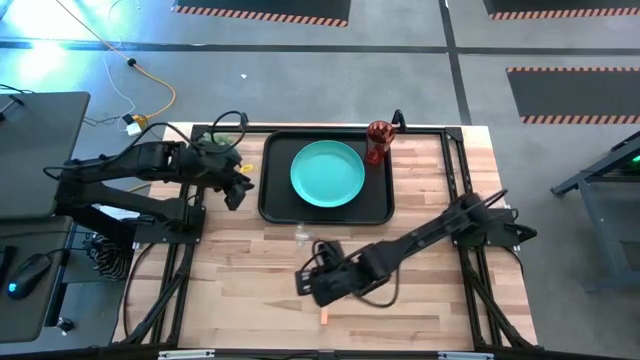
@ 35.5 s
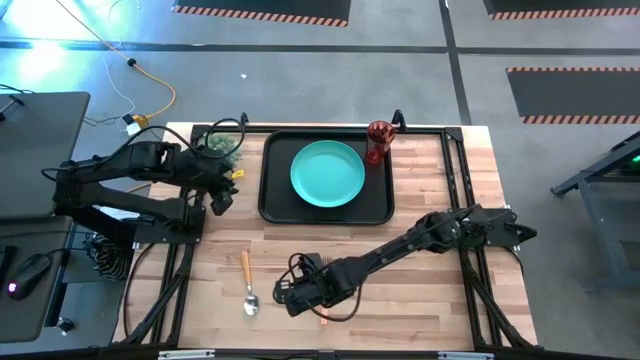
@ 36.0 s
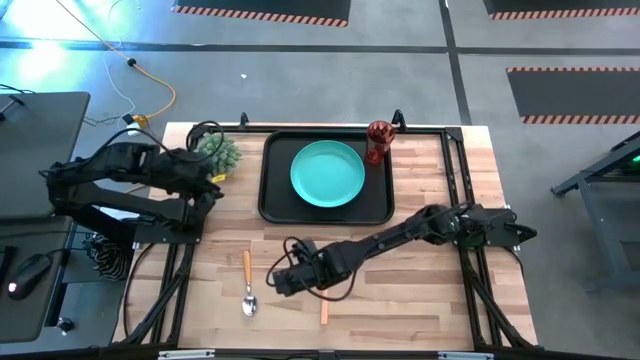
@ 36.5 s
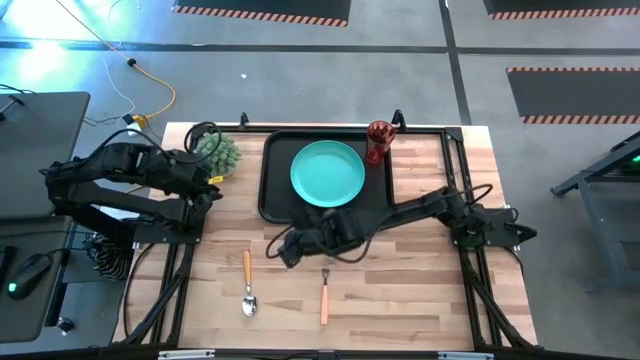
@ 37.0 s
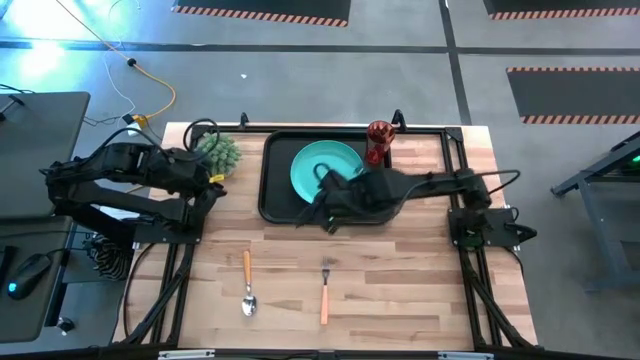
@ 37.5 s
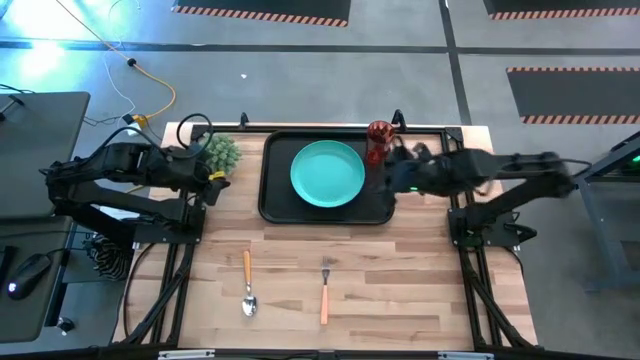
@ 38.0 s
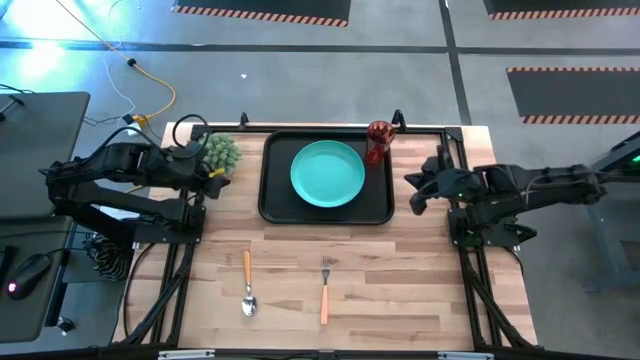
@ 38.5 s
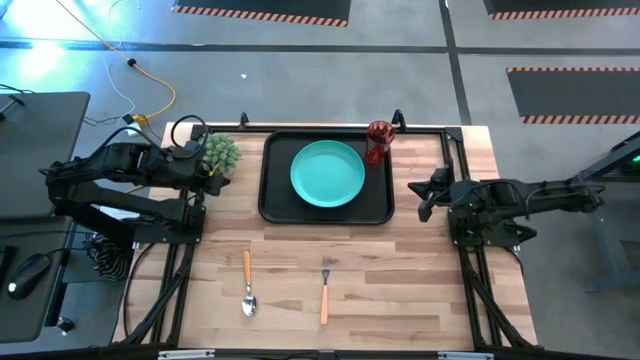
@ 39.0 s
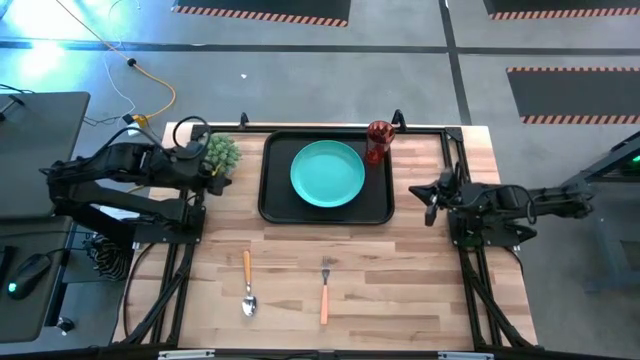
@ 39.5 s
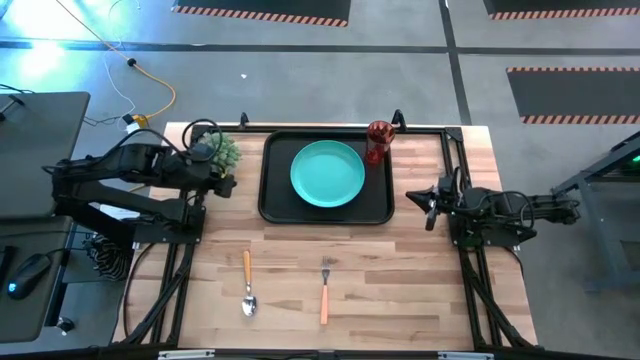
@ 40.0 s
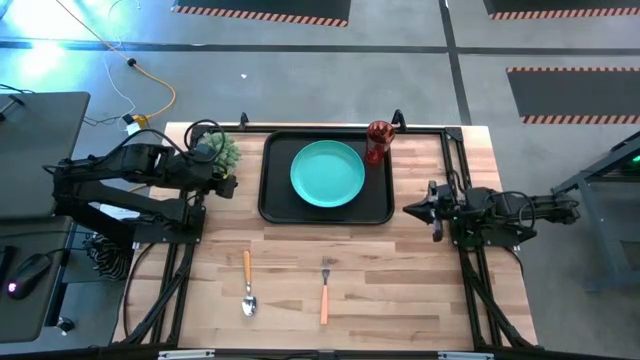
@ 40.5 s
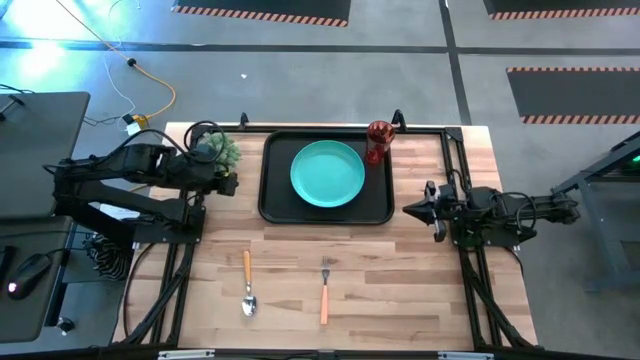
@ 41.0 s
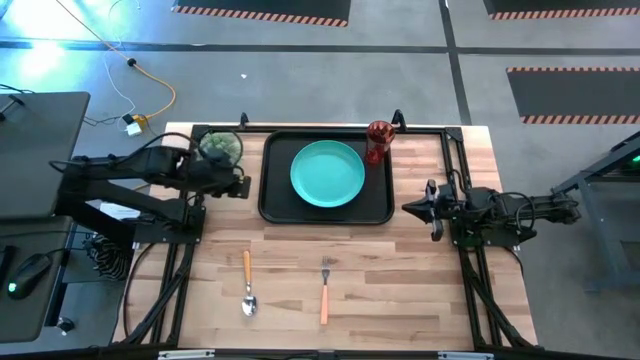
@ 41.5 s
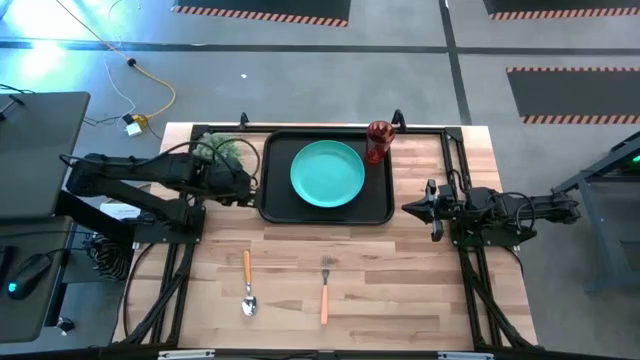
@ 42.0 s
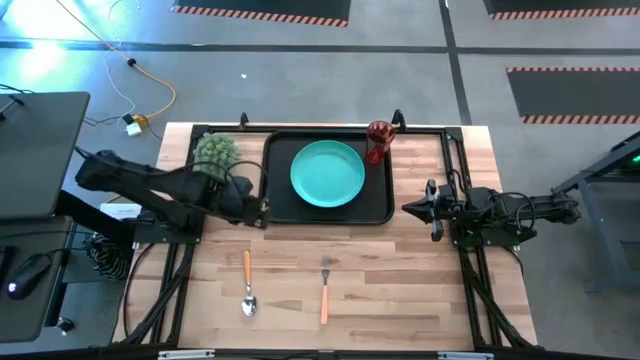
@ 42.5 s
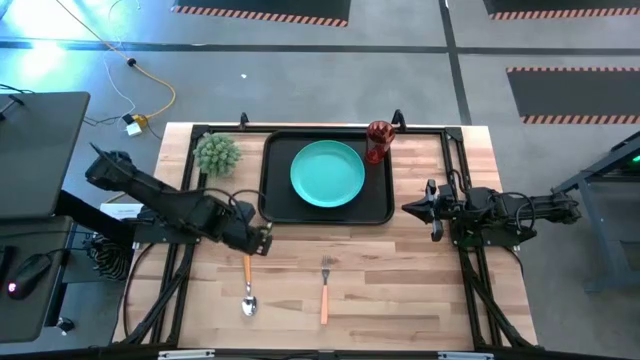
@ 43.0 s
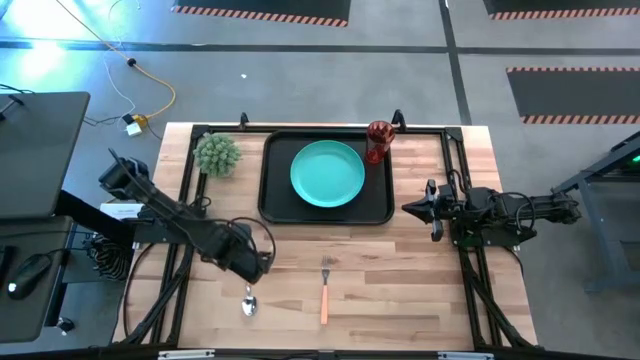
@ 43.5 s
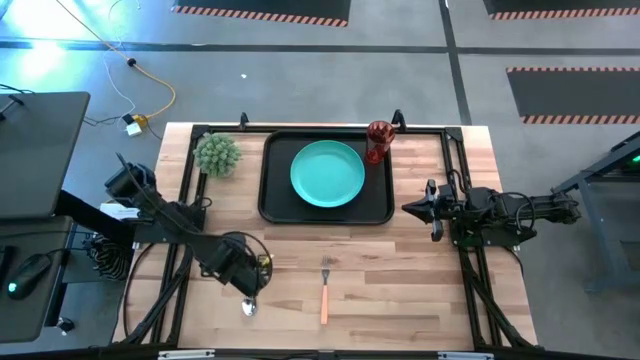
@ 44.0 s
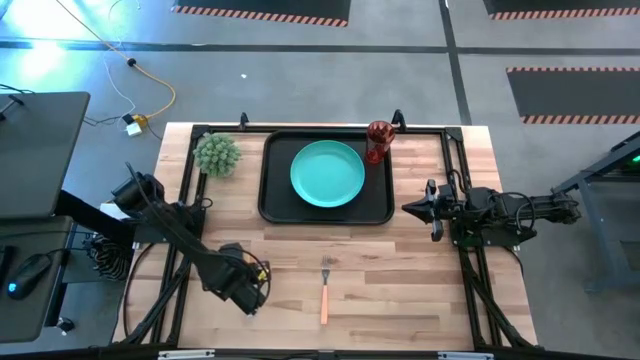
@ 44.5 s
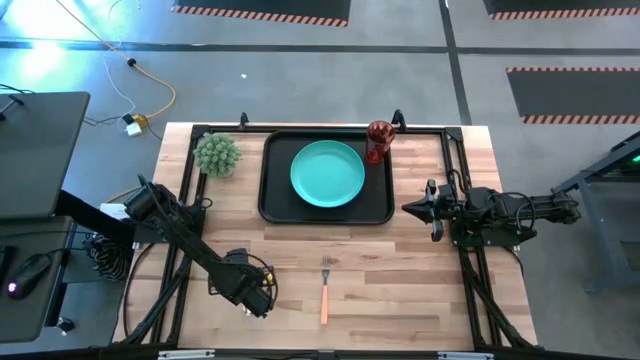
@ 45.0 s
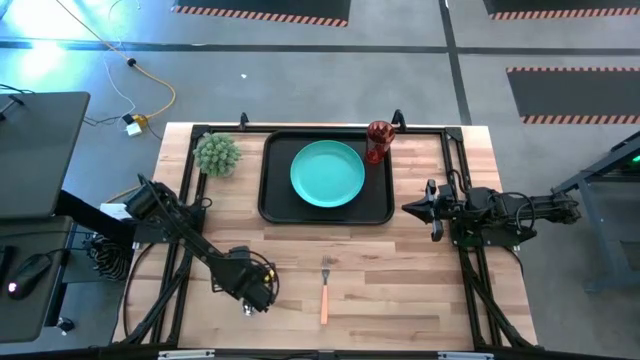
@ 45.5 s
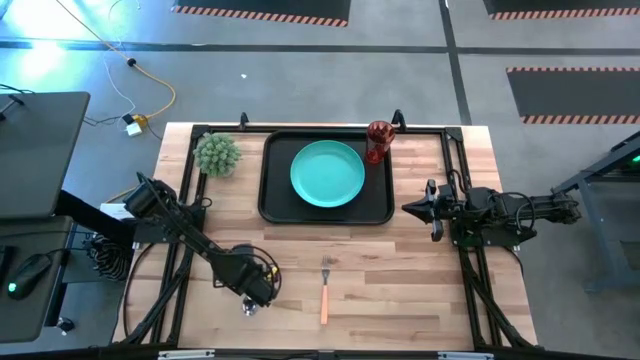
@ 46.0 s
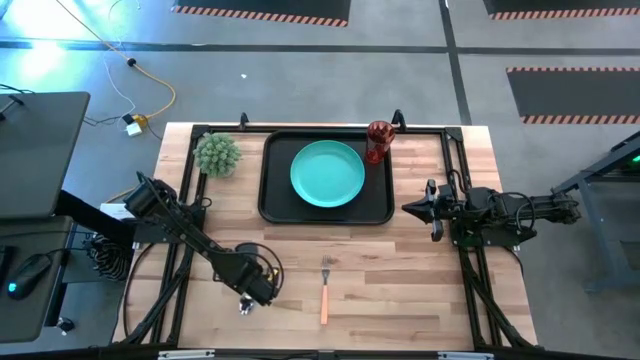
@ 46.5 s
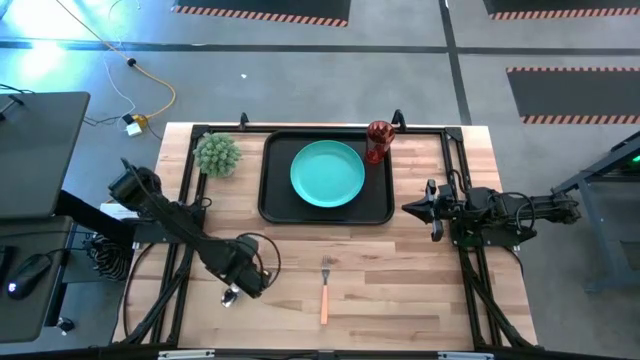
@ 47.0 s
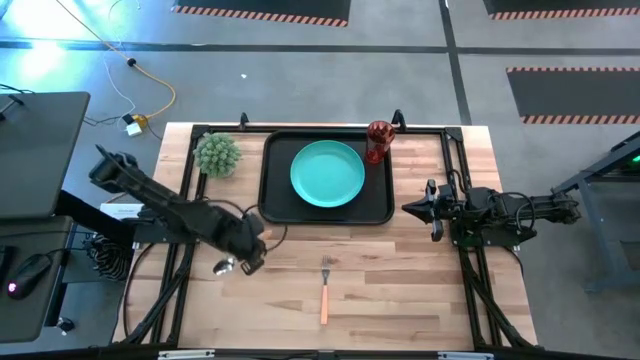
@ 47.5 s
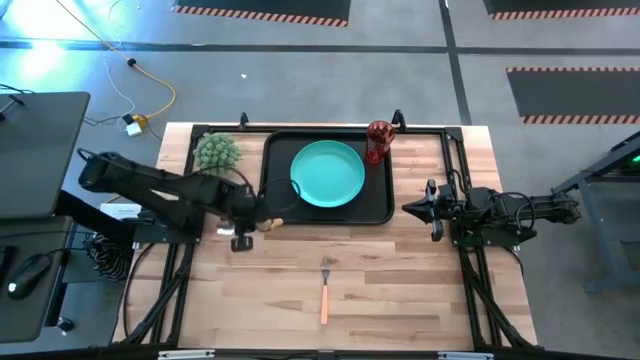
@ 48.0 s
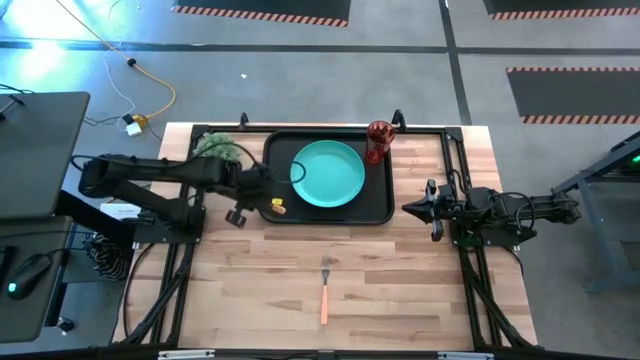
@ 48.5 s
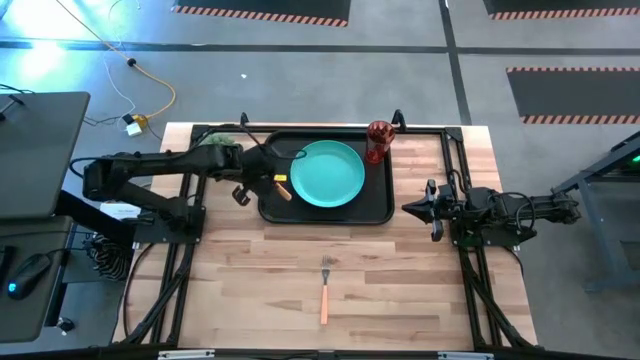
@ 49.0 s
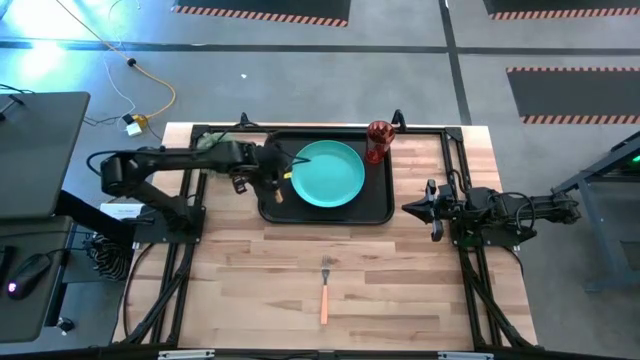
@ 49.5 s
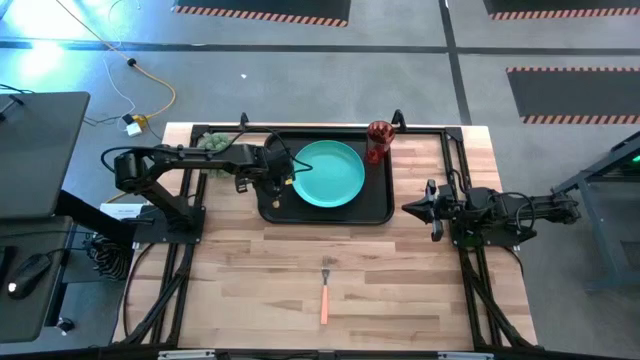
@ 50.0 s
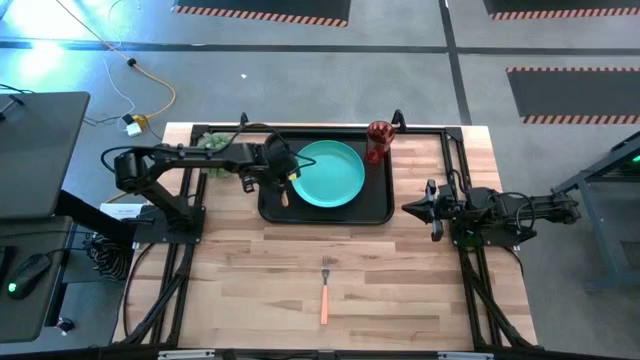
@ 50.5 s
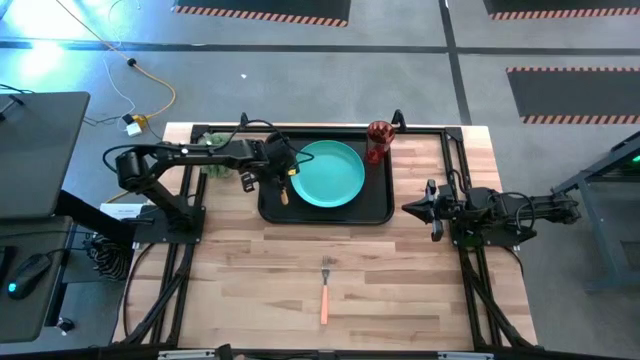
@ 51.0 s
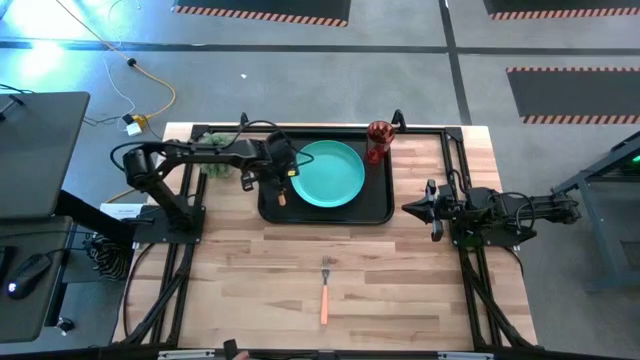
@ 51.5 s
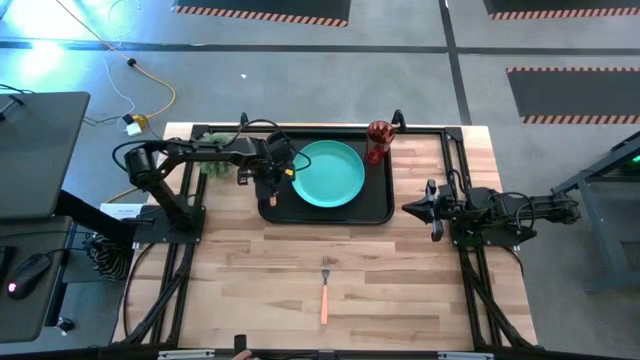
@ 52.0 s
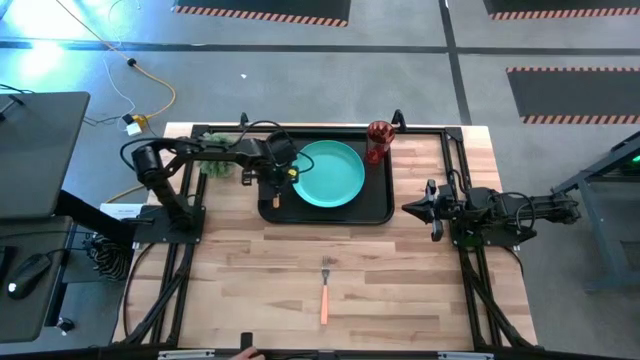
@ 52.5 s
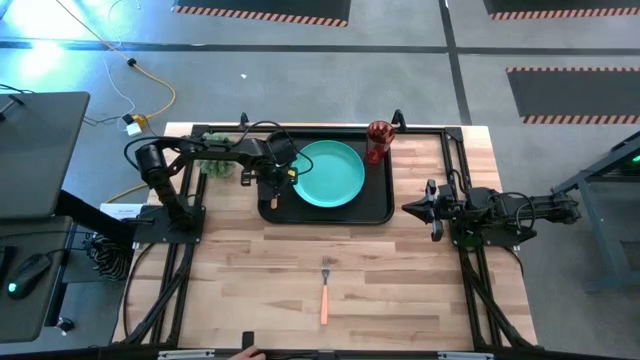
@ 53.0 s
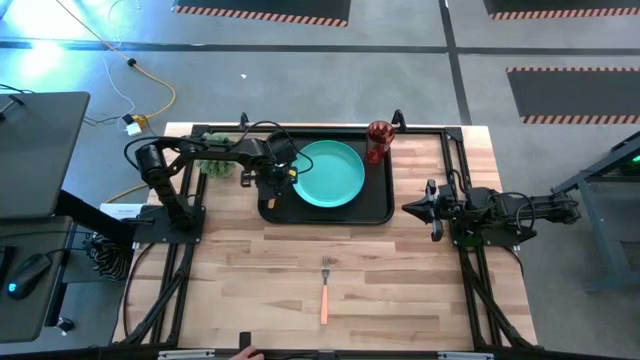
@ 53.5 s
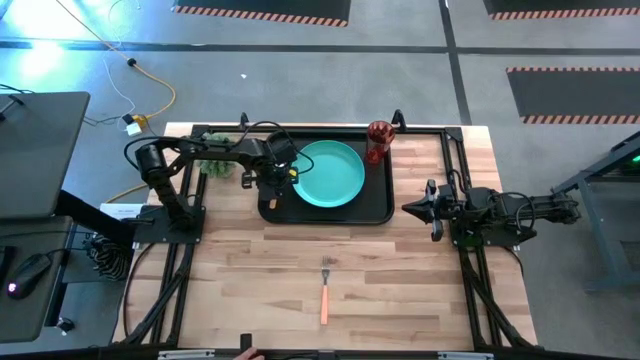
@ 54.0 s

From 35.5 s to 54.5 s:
Task: Pick and place plate/cup/fork/spoon on tray
Put the yellow spoon on the black tray to the left of the blue plate

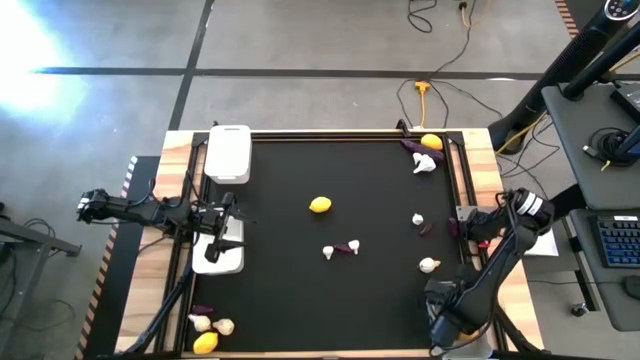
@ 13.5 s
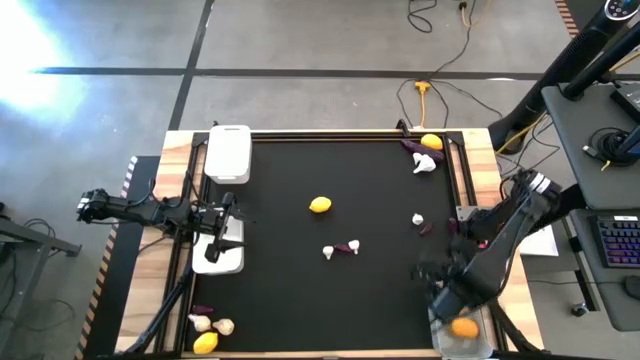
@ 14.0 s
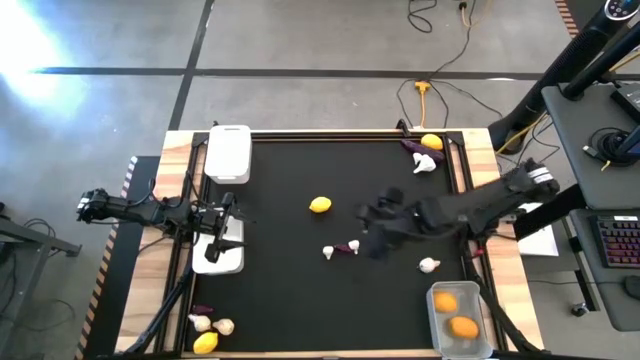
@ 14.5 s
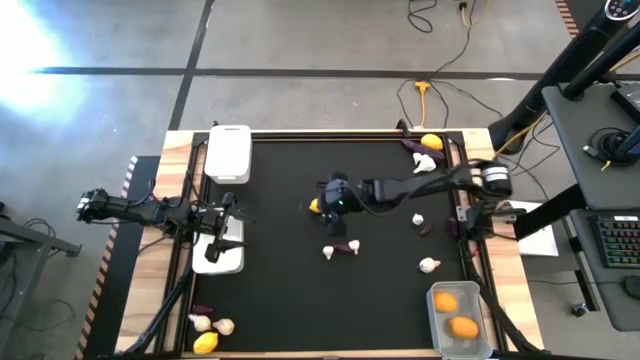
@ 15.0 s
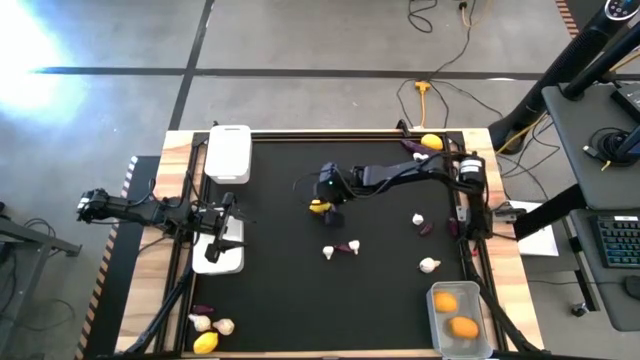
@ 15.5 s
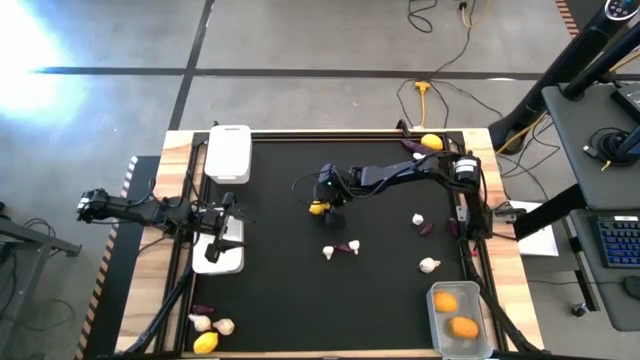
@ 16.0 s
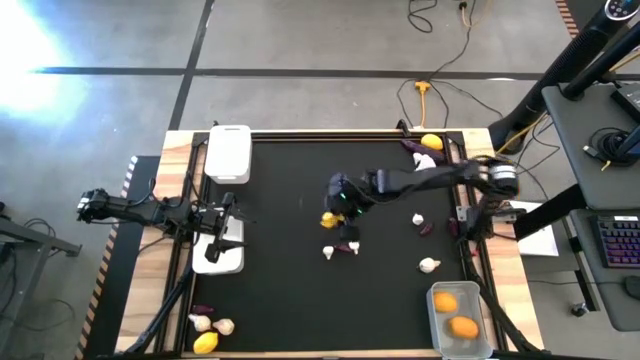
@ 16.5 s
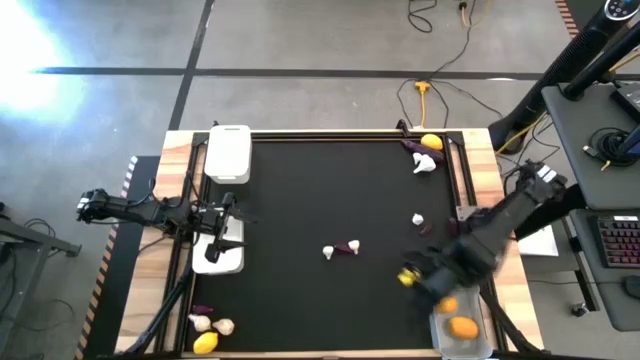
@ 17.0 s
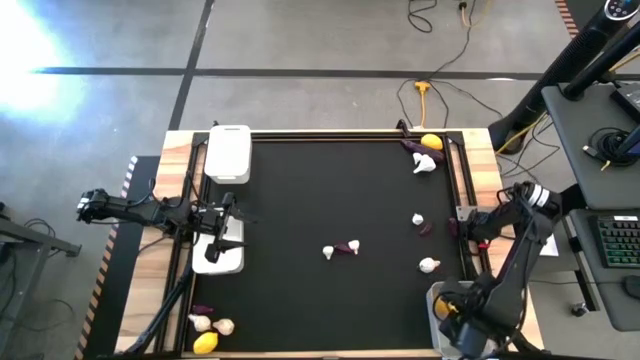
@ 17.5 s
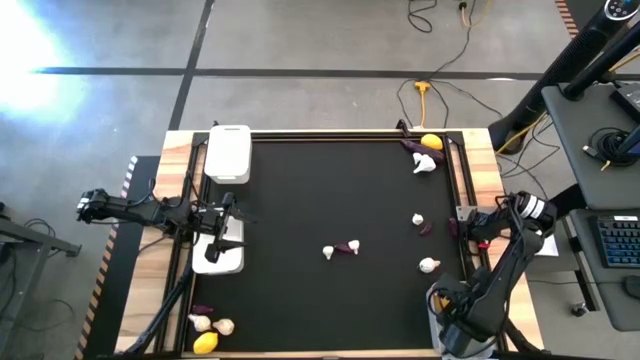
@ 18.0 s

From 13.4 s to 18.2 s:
Task: Sort produce into baskets
Put the lemon into the gray bin
